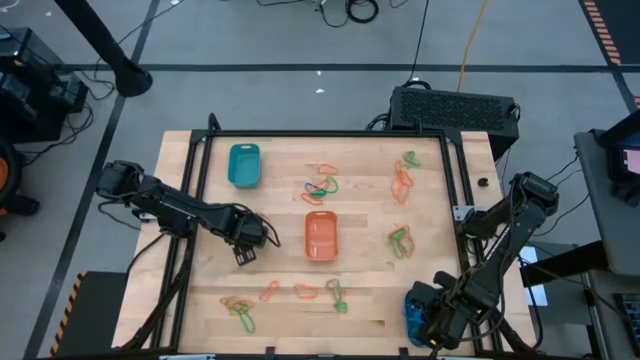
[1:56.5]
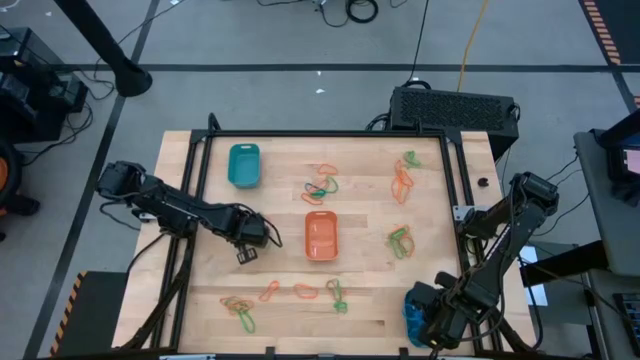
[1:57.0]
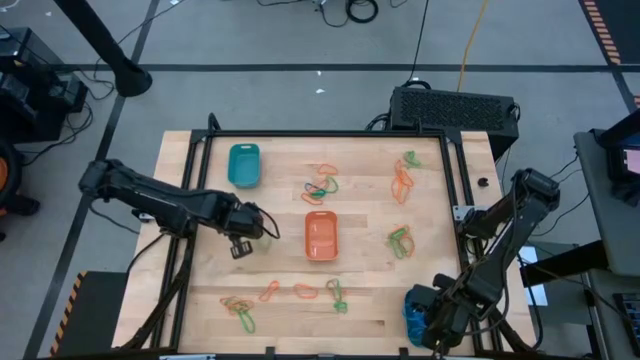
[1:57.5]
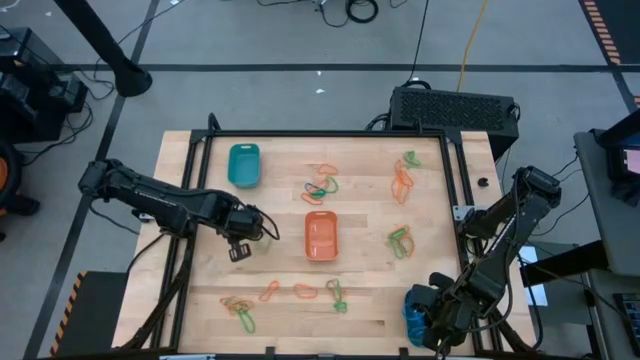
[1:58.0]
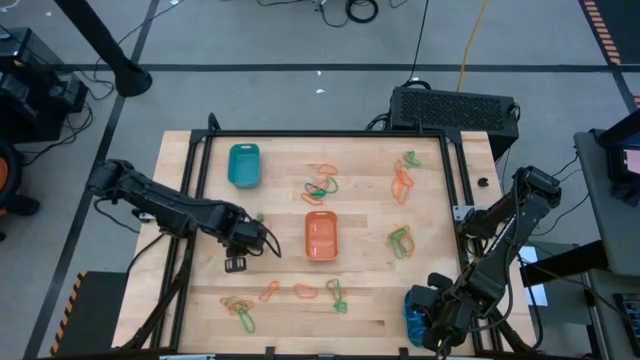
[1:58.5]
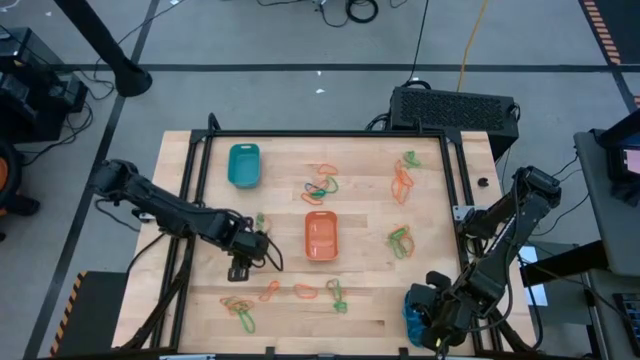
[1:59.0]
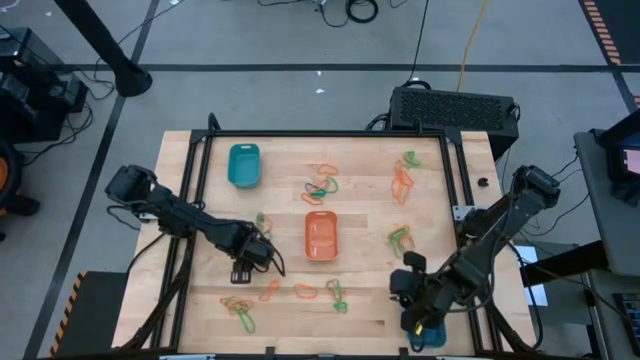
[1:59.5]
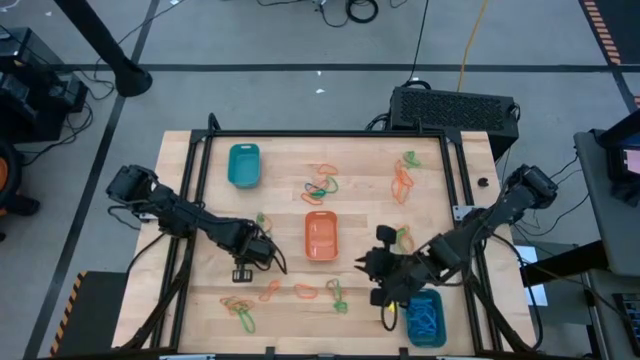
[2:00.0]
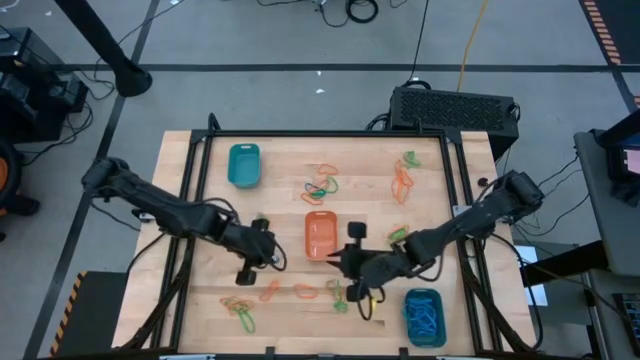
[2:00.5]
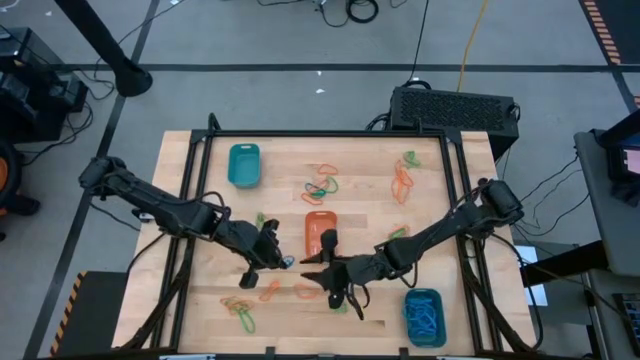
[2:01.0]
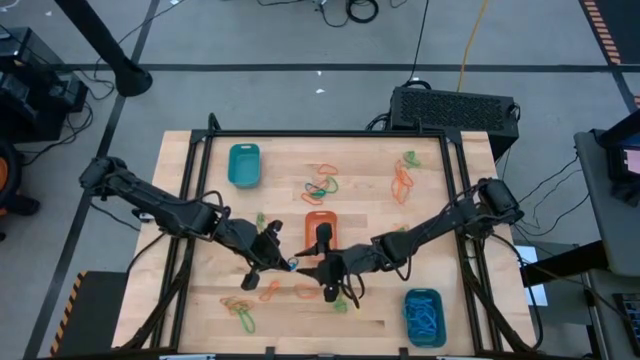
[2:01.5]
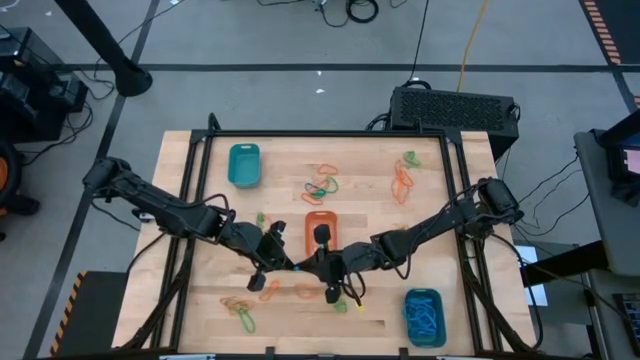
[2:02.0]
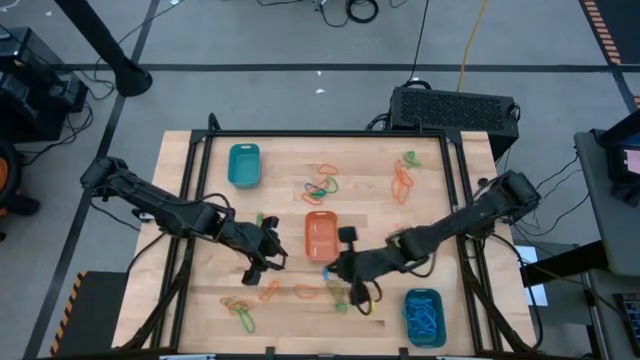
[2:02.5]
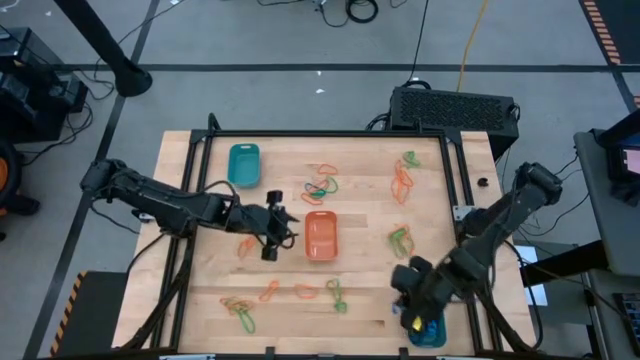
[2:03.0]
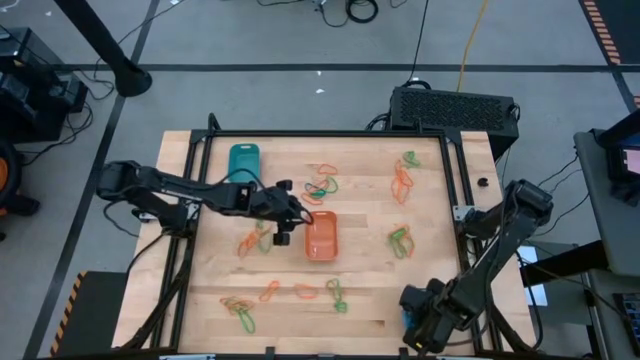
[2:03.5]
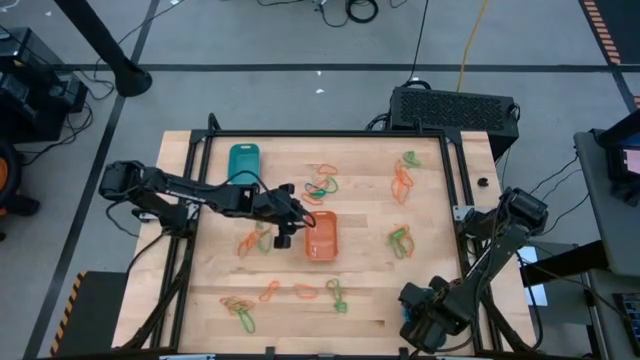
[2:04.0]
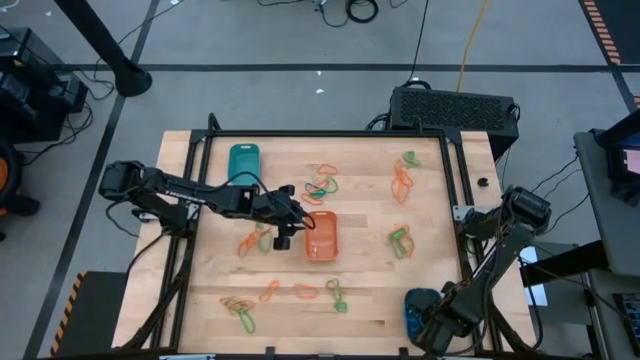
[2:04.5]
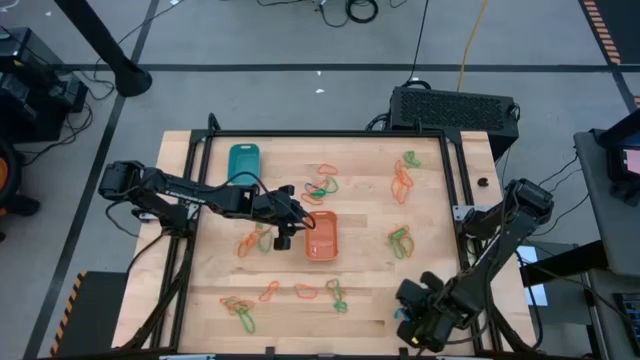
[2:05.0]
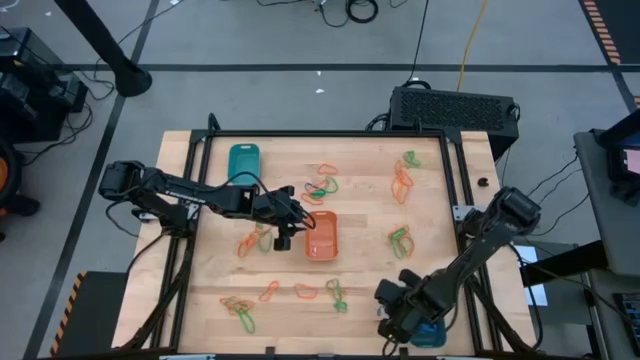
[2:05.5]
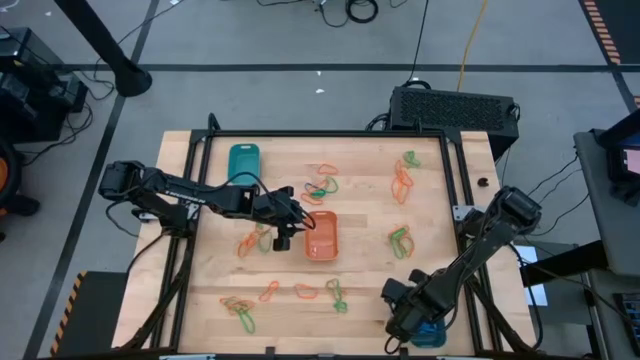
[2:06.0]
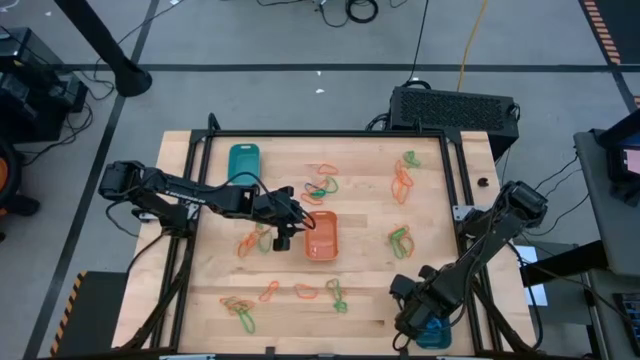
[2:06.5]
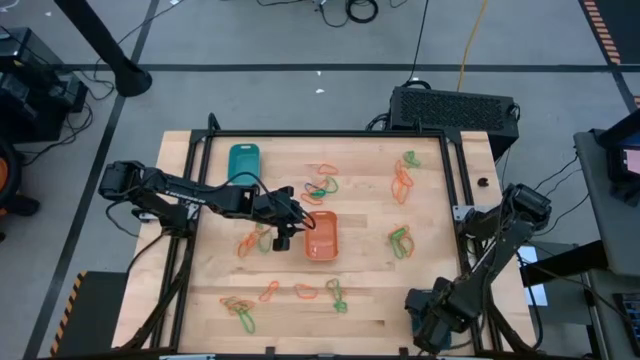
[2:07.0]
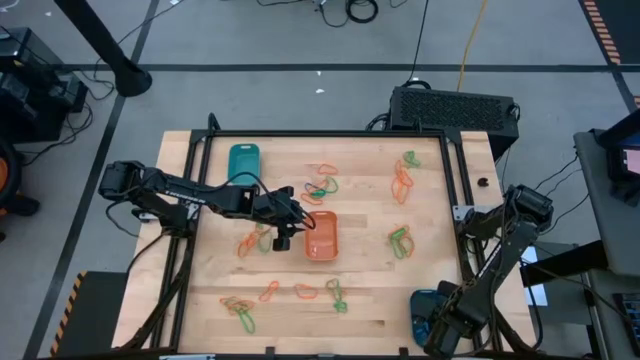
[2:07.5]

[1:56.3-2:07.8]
Task: Sort rubber bands into baskets
Put the blue rubber band into the blue bin

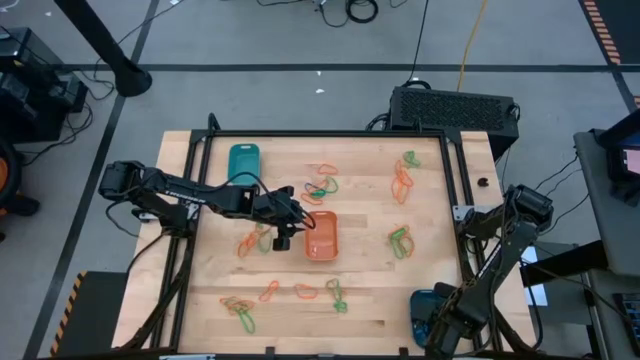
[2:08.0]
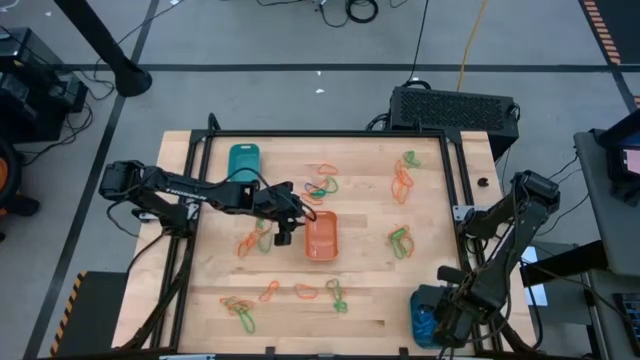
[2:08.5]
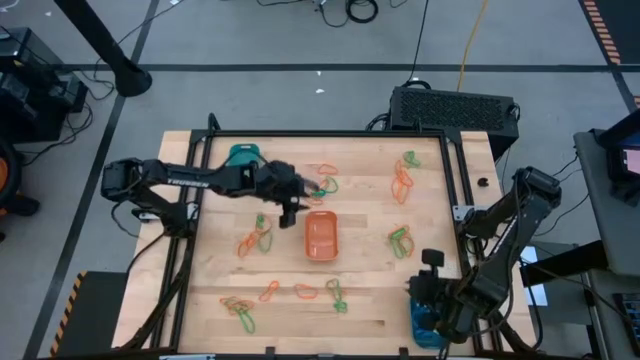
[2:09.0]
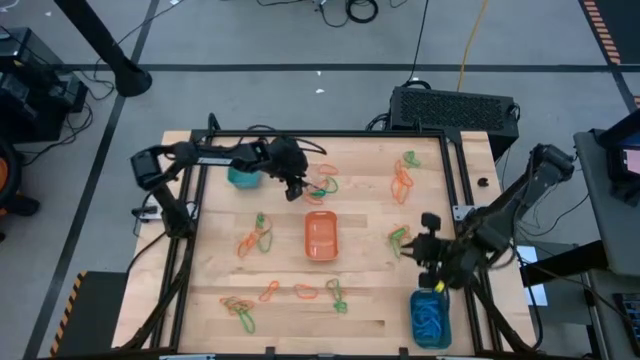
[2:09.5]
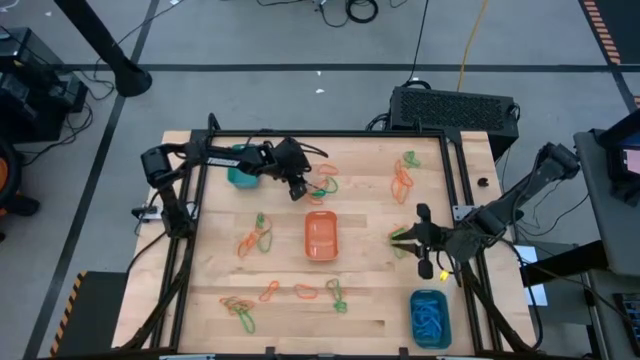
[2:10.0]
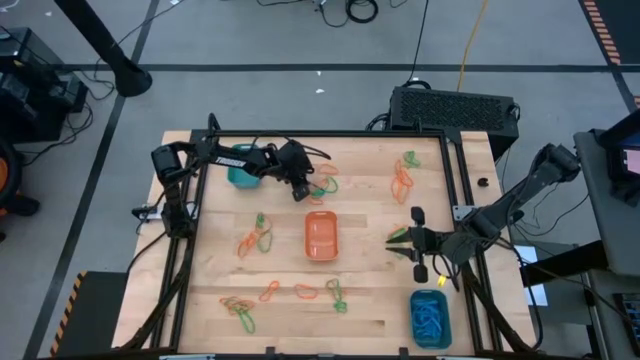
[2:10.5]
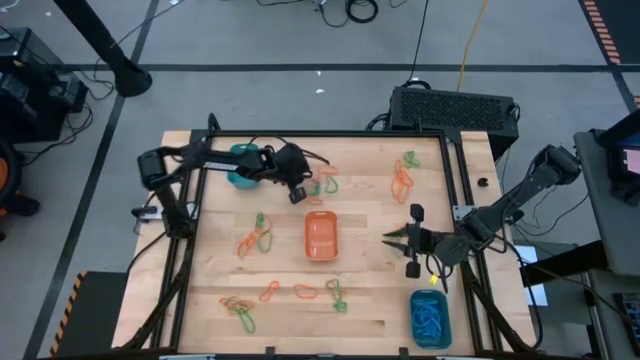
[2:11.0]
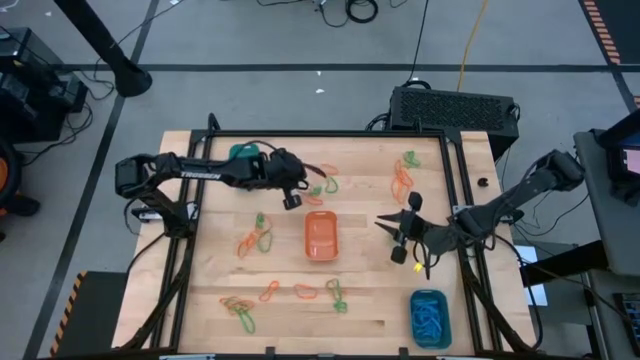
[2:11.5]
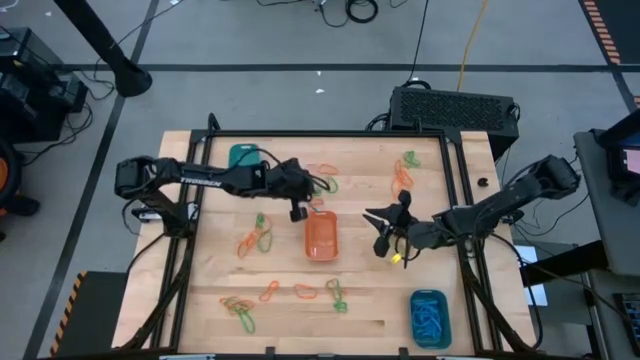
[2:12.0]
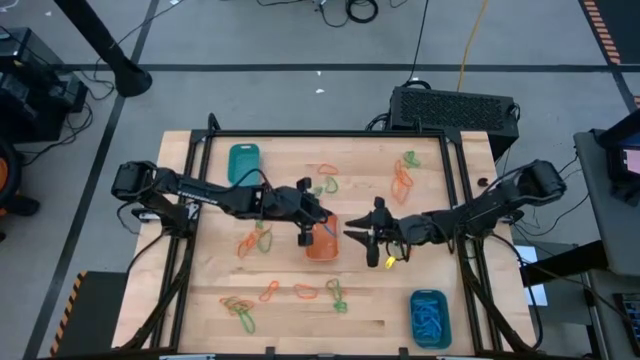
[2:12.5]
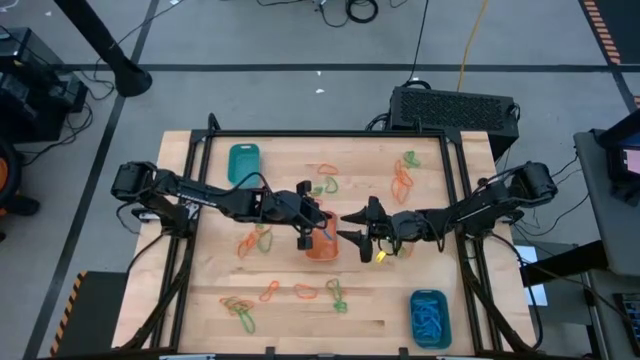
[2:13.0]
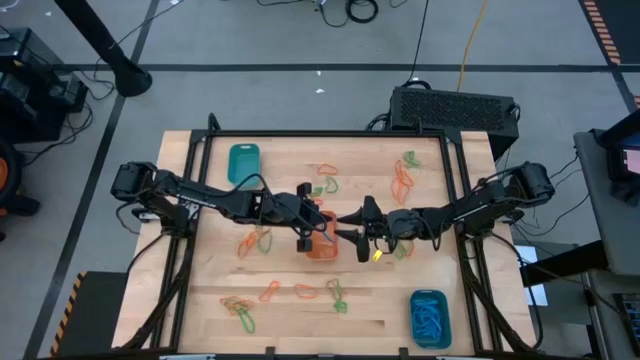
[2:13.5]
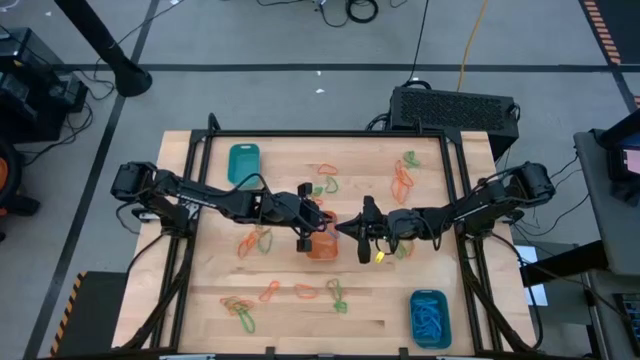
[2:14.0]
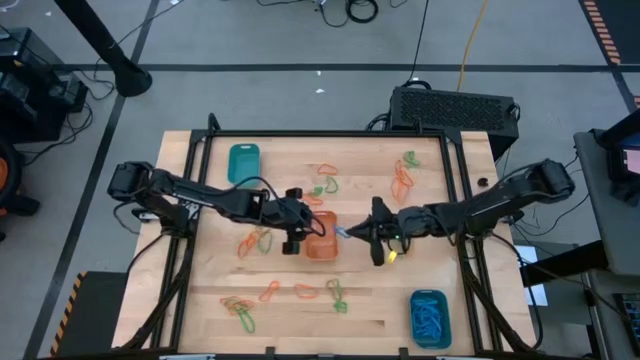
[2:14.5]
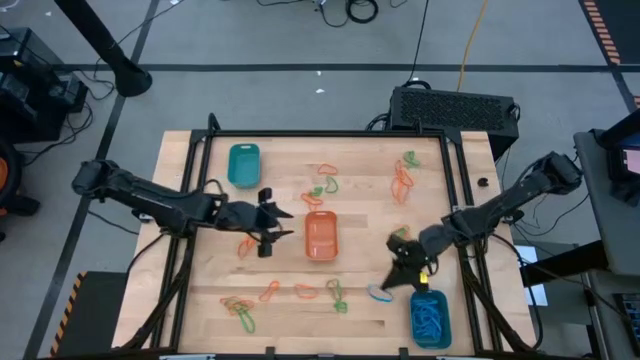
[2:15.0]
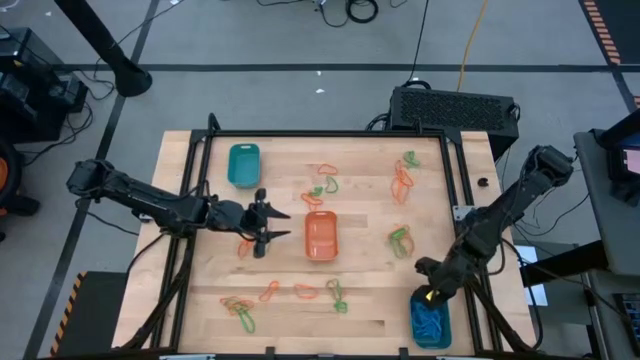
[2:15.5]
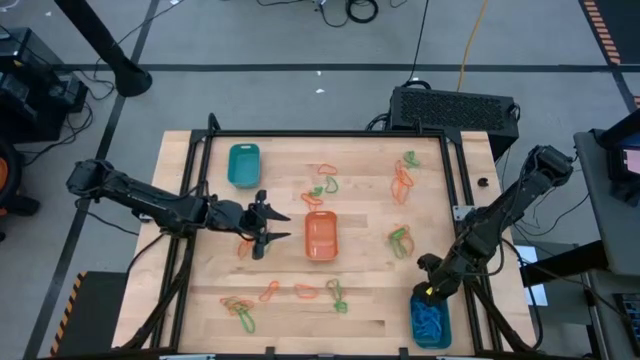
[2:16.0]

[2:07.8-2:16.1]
Put the blue rubber band into the blue bin

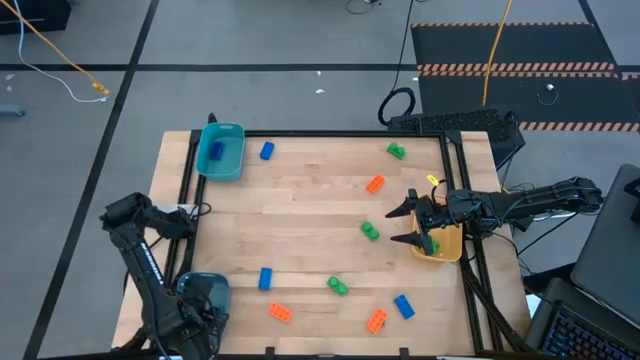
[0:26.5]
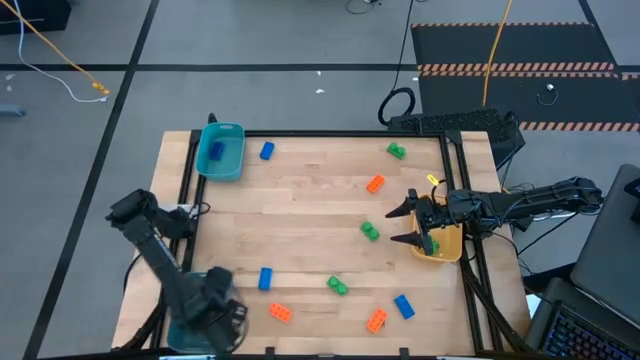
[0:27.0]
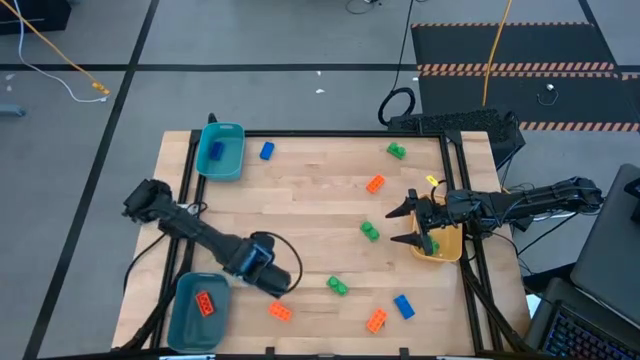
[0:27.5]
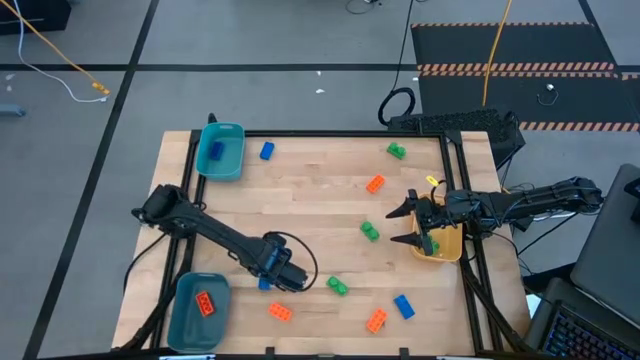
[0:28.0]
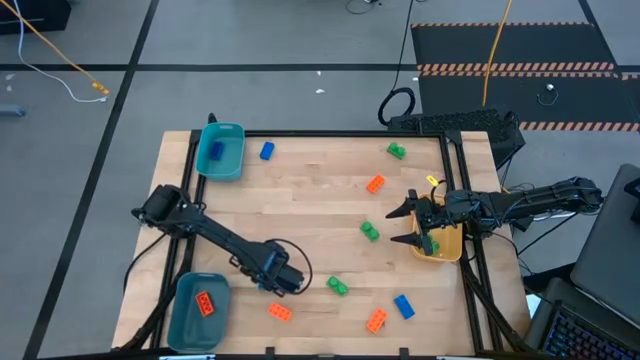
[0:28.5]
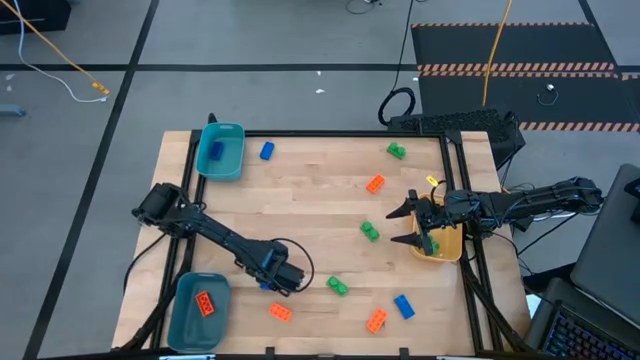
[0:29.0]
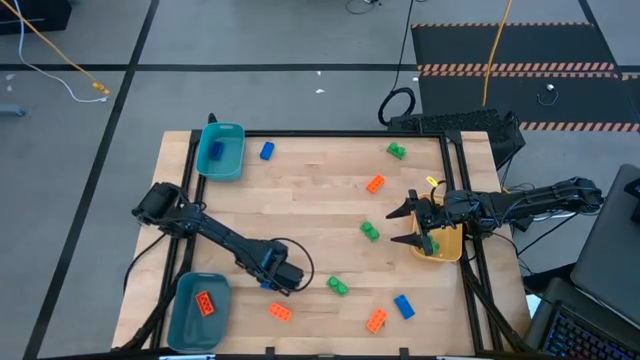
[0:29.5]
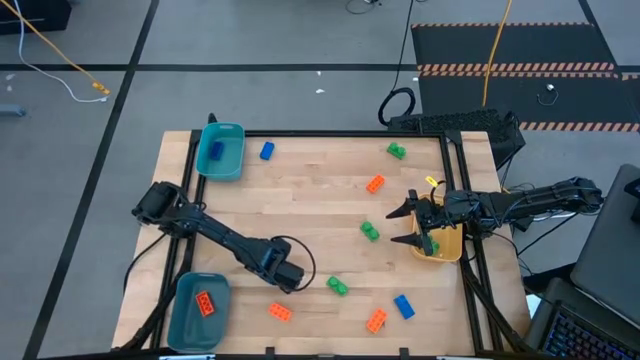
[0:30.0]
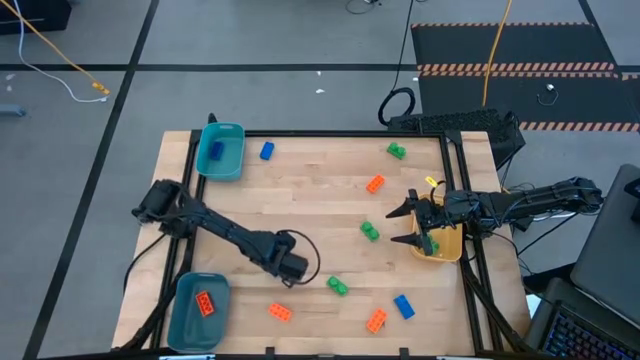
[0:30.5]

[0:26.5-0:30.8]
Task: Sort & place blocks by color
Put the blue game piece into the light blue bin
